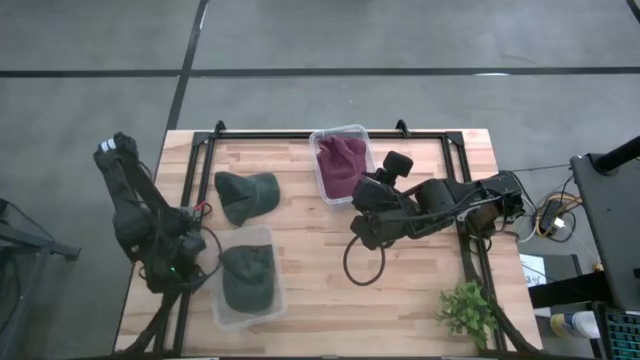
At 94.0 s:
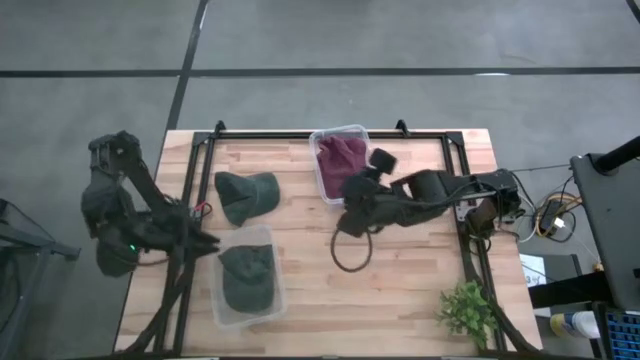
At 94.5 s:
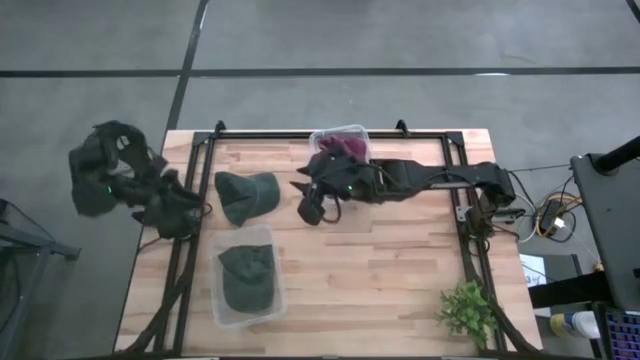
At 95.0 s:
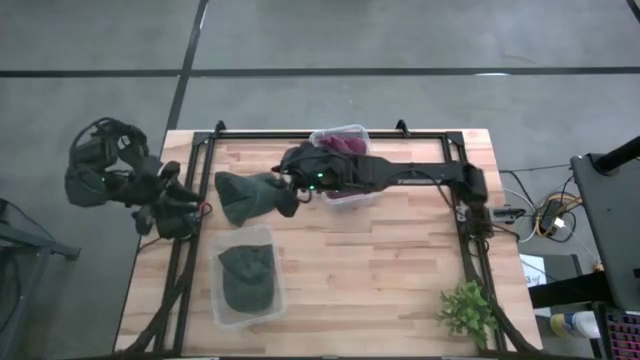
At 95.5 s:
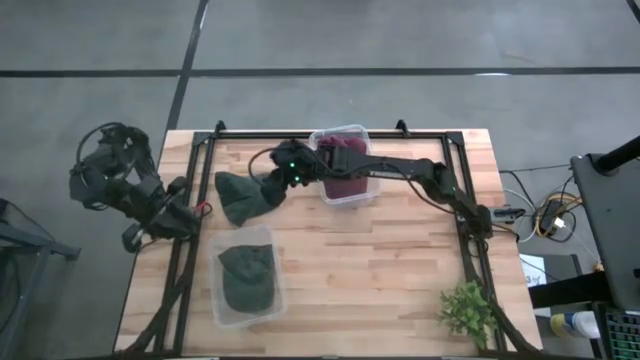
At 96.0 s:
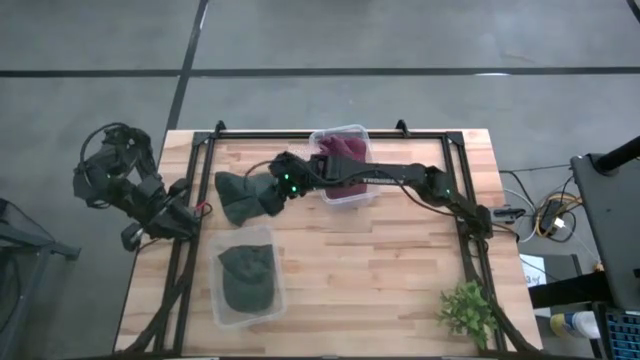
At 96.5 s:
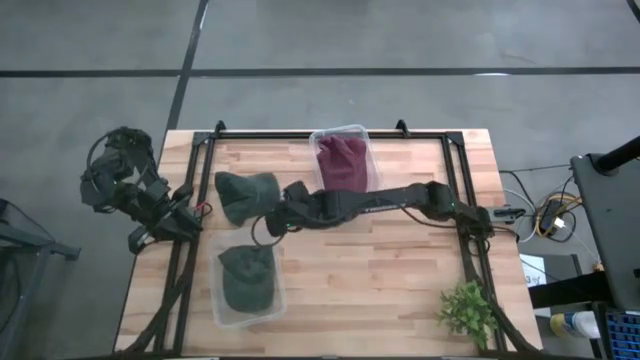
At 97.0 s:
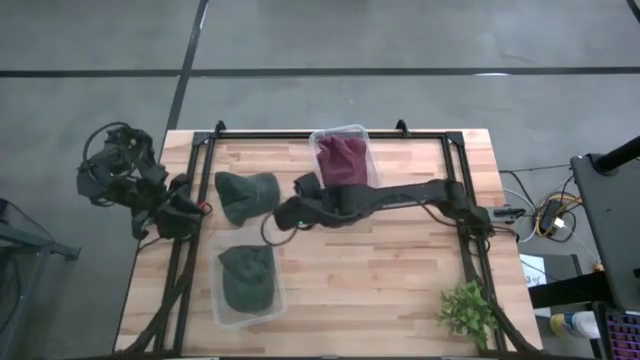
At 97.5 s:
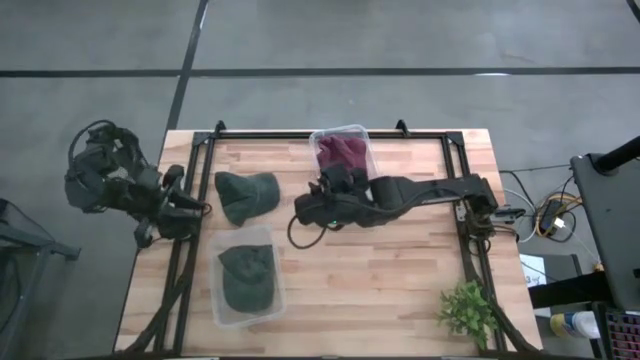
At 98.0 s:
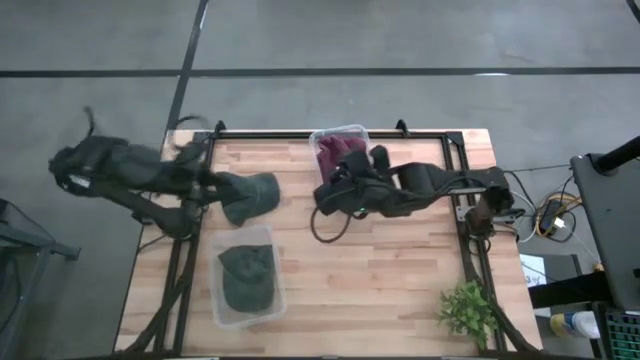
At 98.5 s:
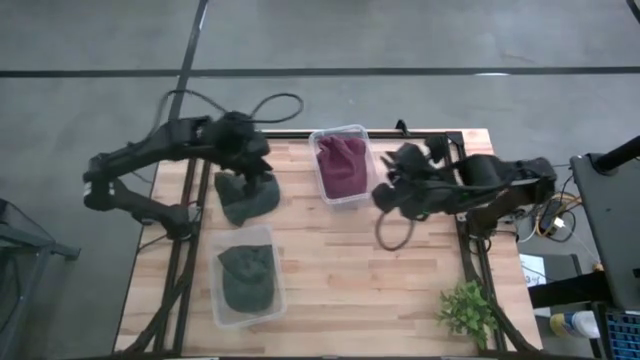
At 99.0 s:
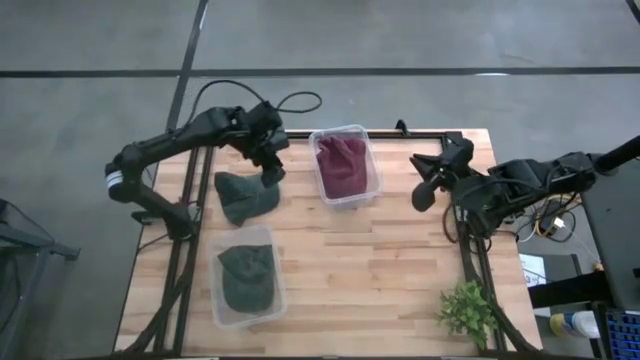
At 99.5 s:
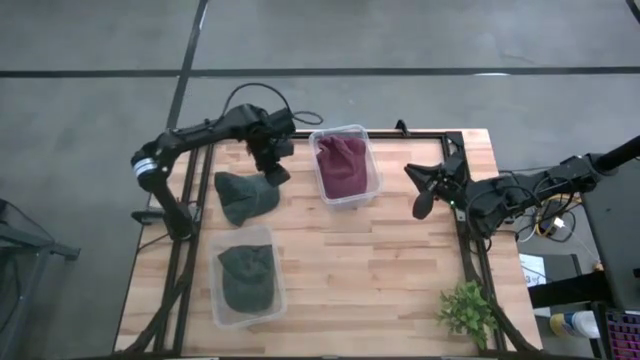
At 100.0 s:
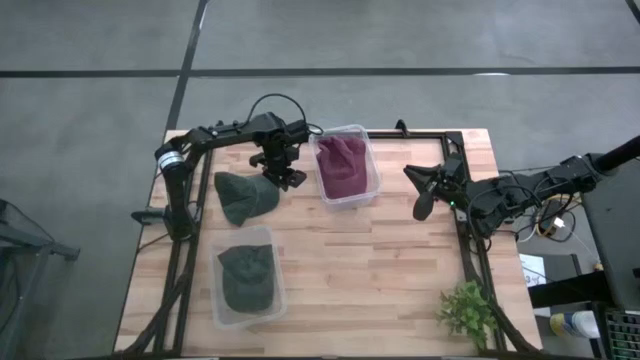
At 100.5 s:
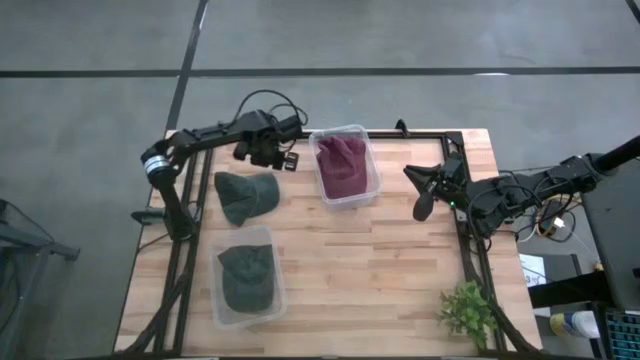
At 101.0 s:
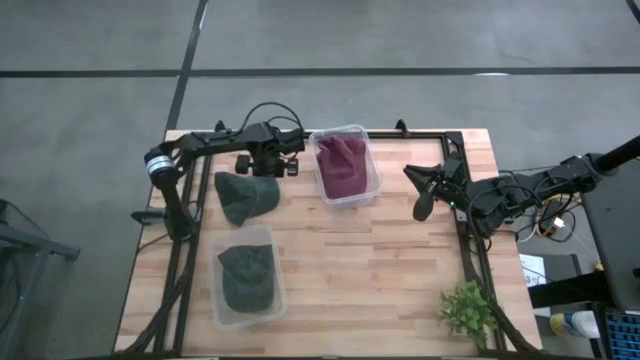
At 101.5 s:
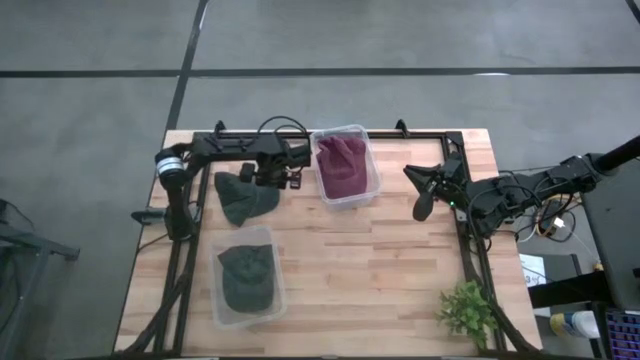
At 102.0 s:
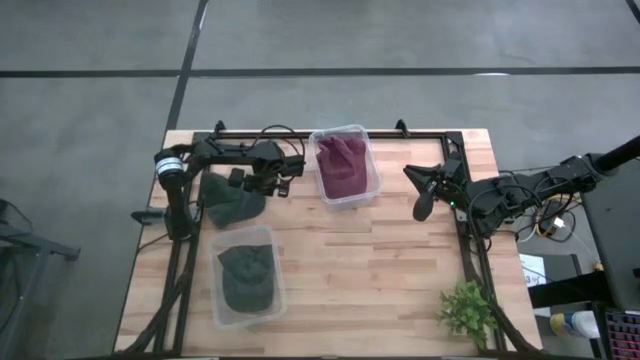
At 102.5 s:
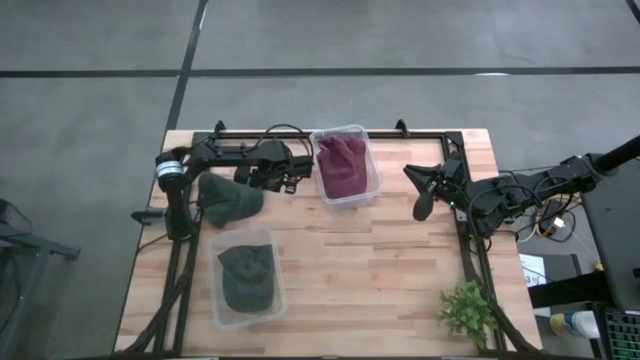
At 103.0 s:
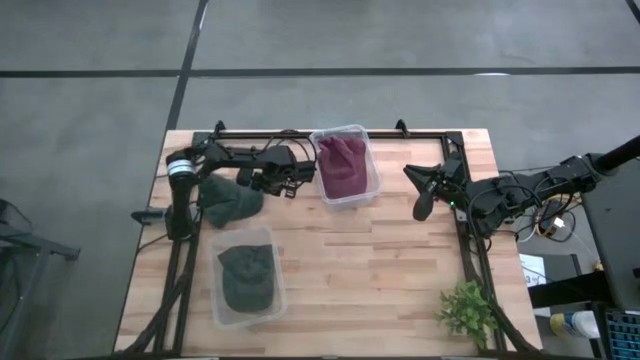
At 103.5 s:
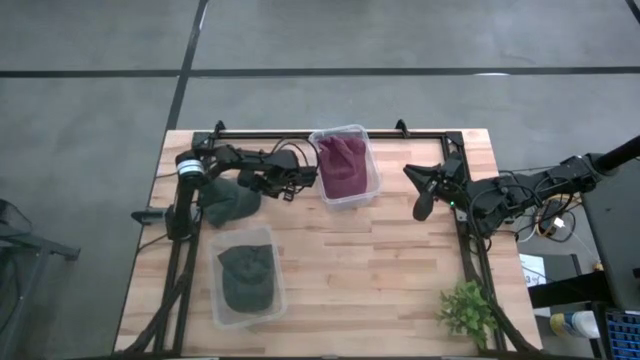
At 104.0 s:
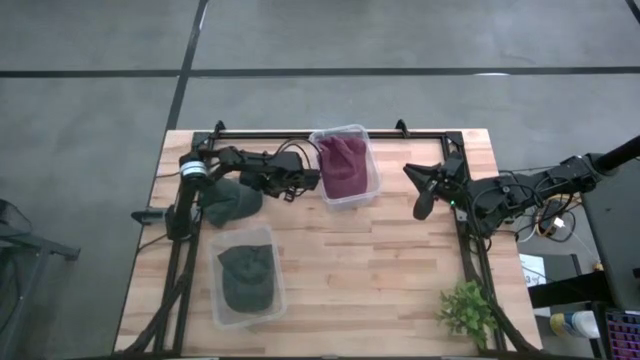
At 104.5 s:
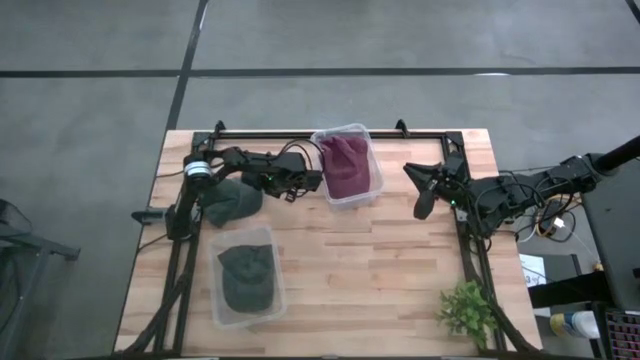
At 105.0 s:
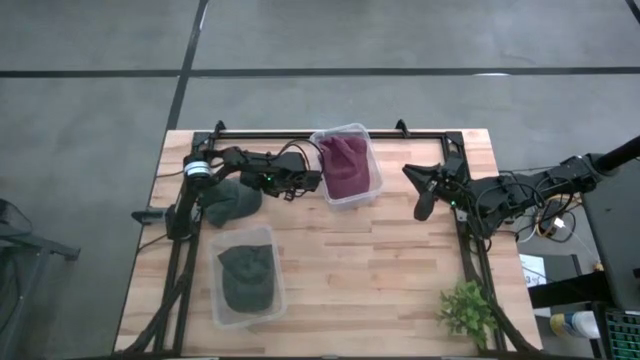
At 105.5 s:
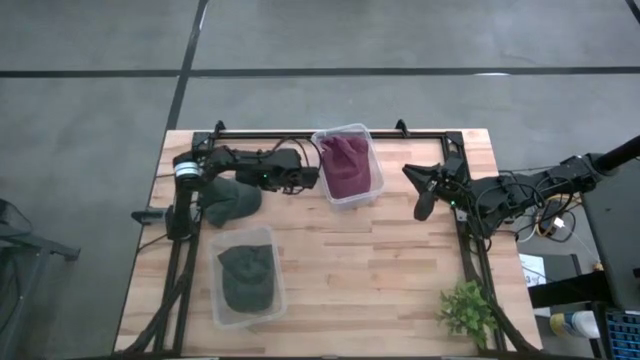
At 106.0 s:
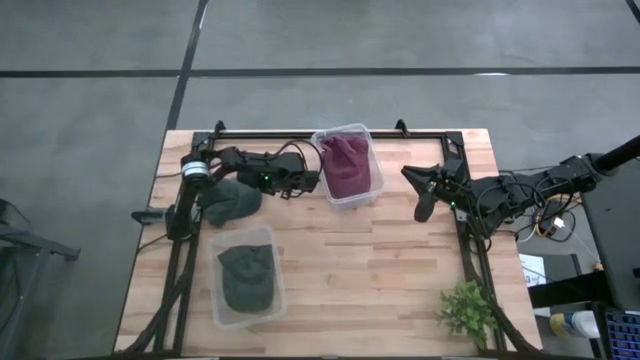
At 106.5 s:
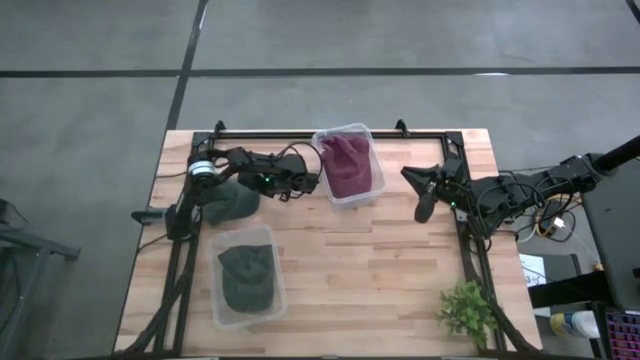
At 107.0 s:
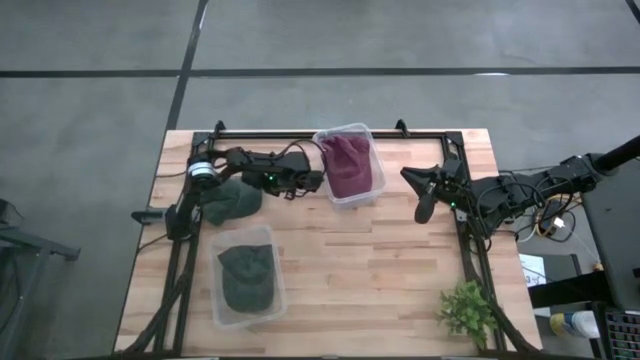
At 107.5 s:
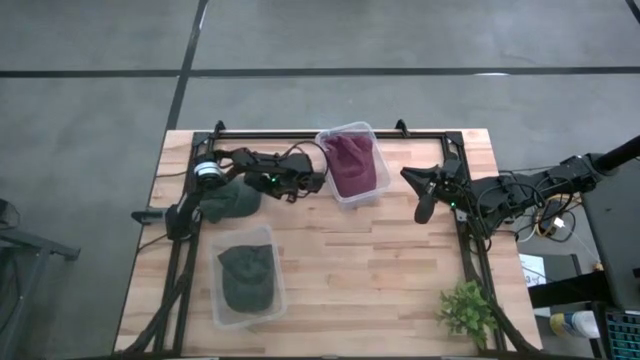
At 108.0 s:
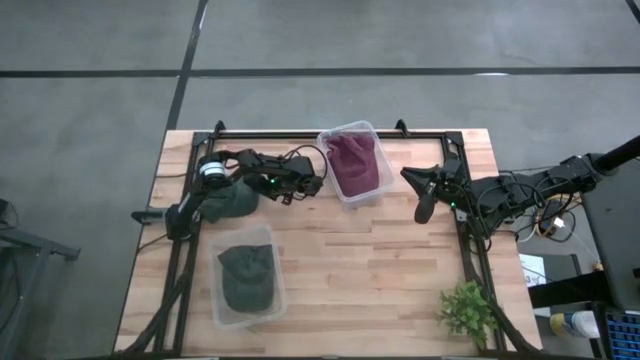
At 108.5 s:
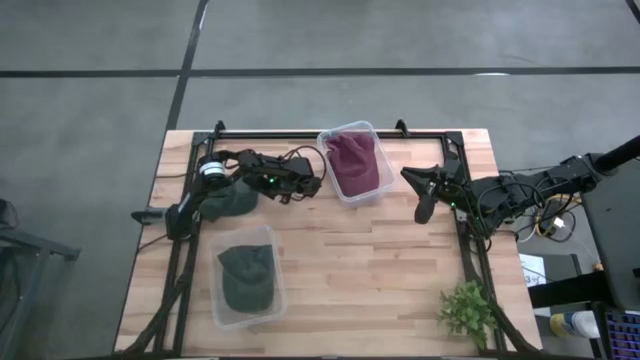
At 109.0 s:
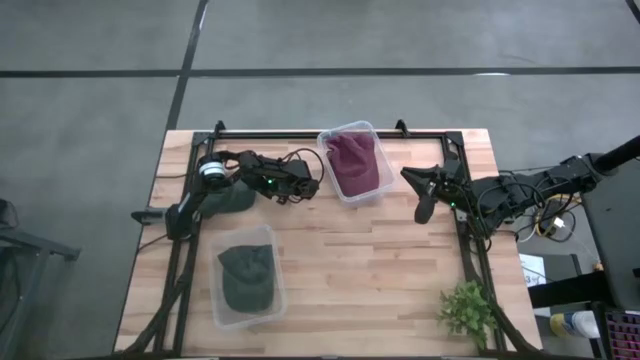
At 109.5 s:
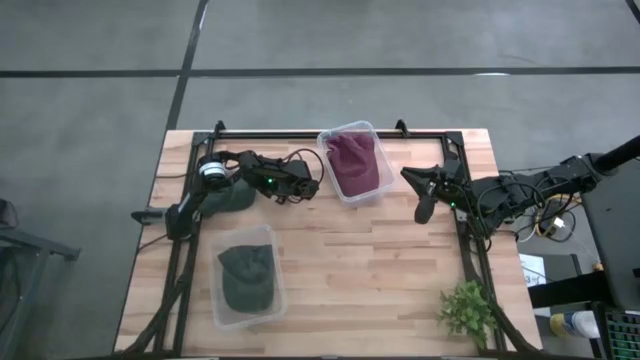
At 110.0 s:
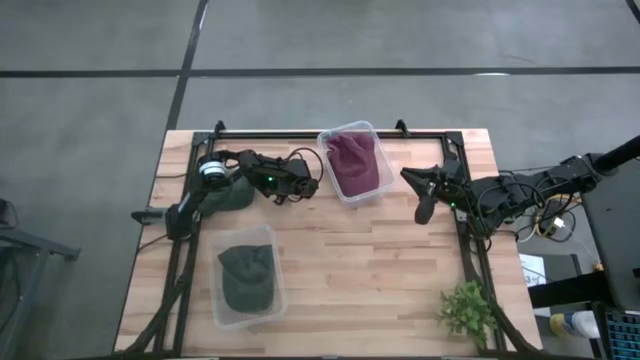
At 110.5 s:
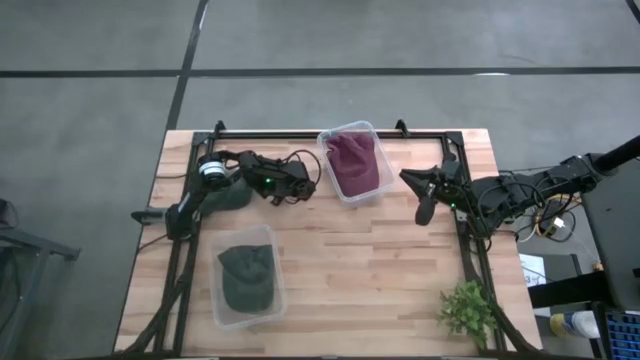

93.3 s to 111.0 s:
Task: Pick & Place hat
Put the green cap into the bottom transparent bin
